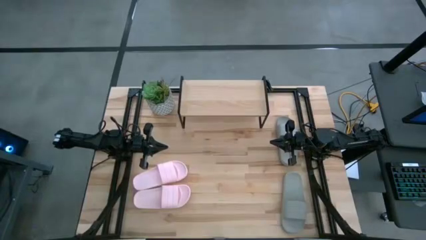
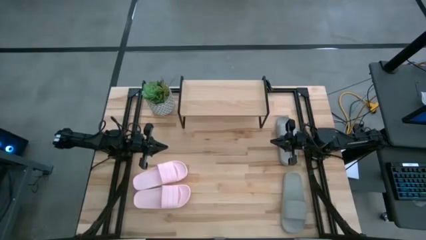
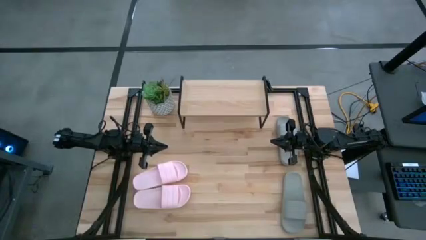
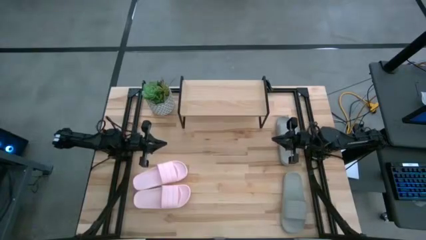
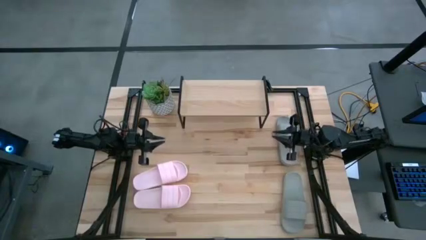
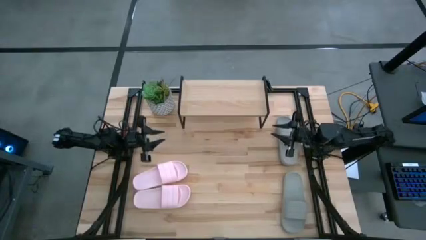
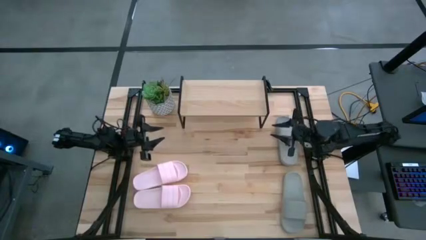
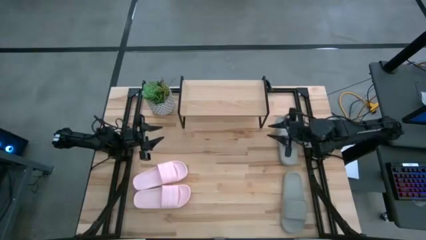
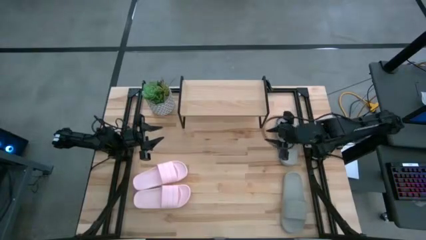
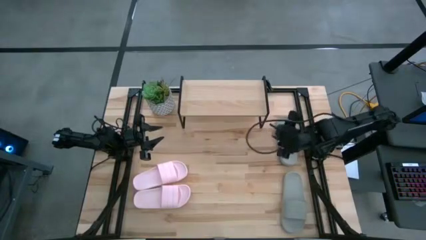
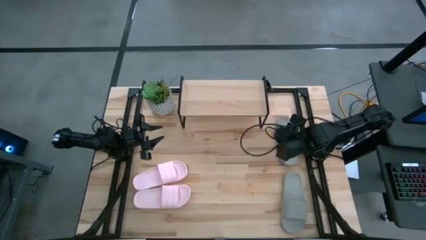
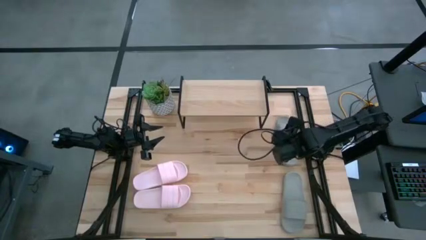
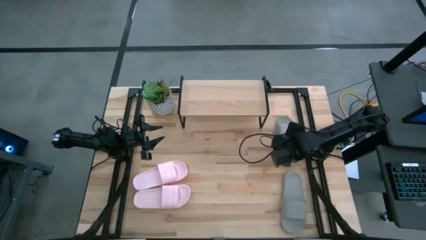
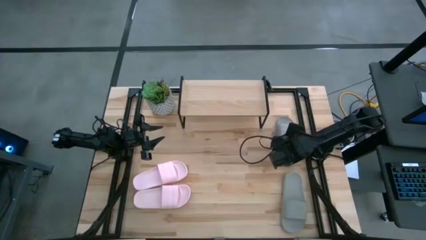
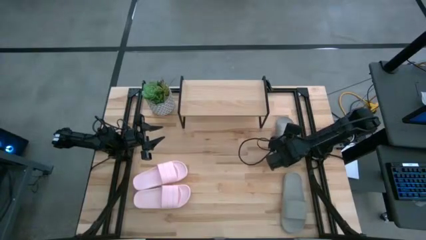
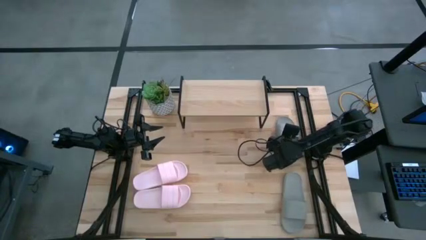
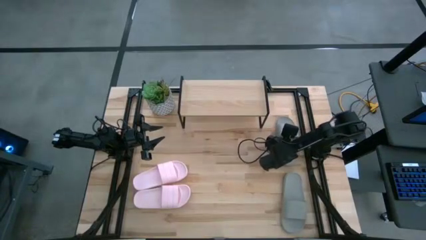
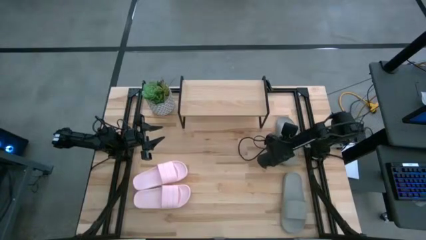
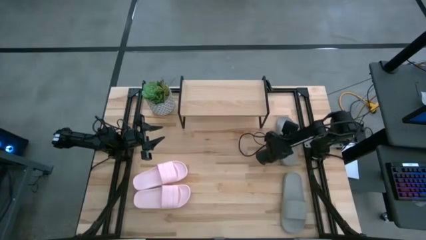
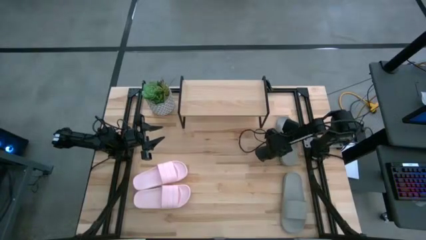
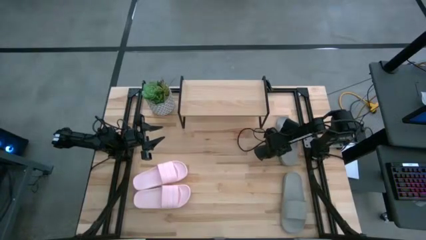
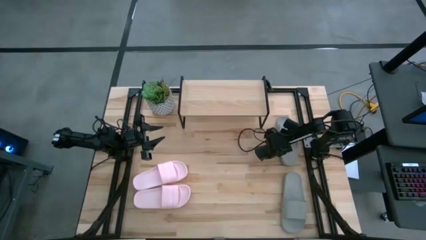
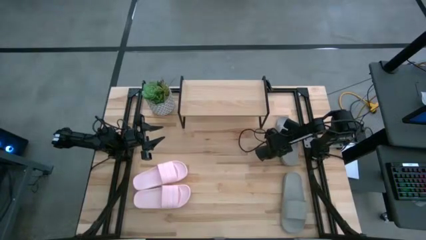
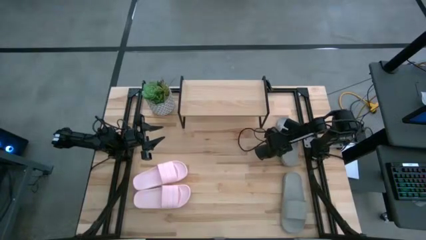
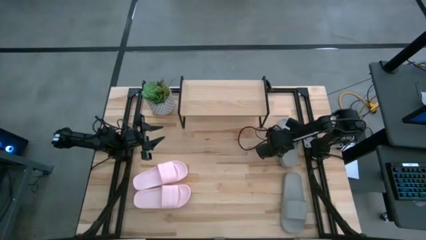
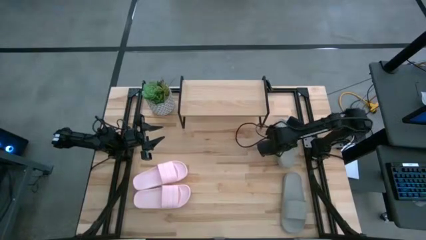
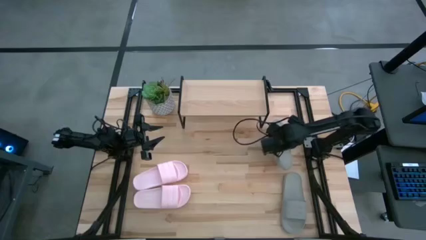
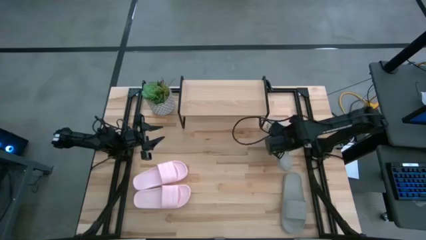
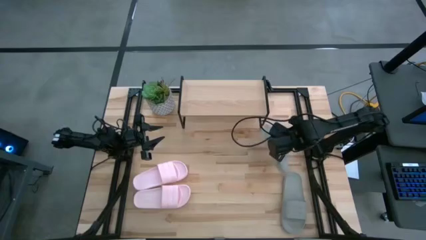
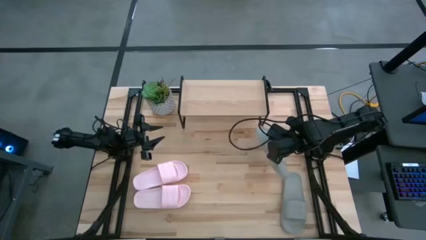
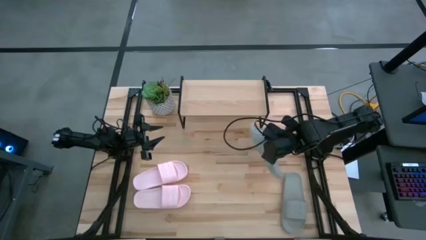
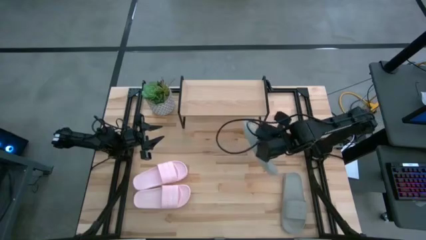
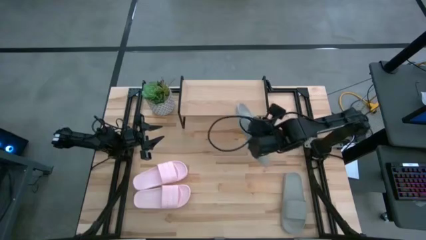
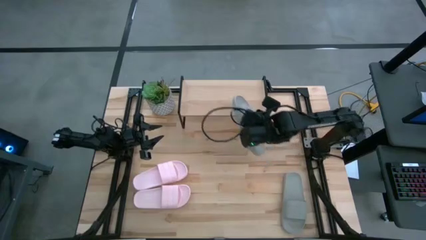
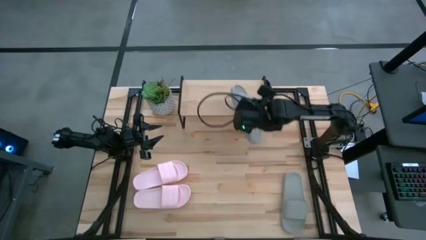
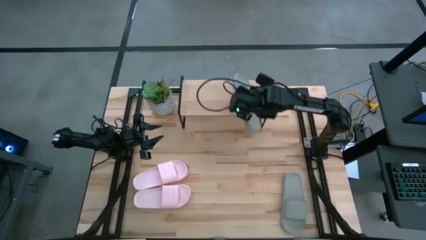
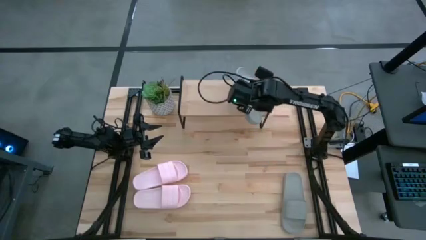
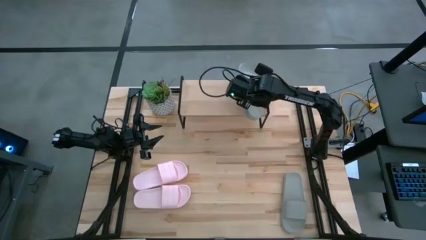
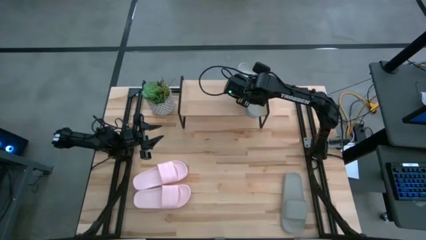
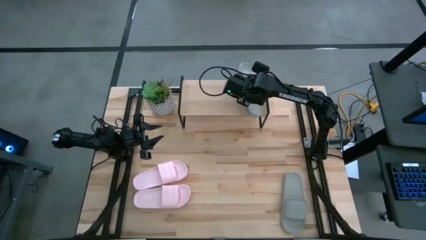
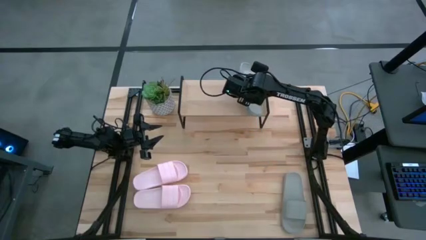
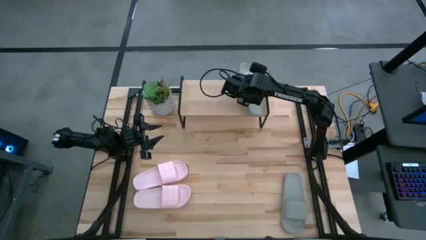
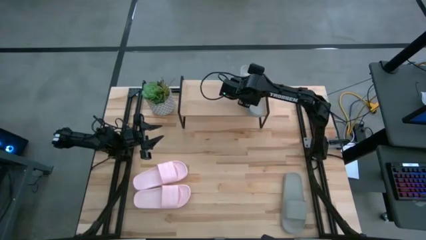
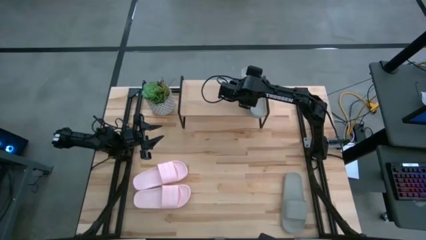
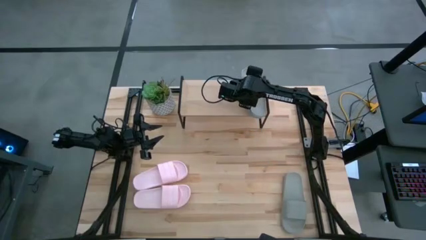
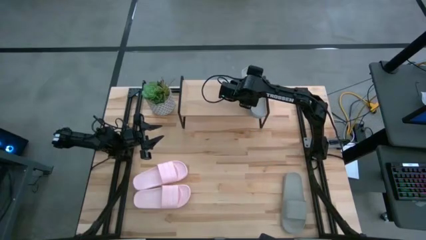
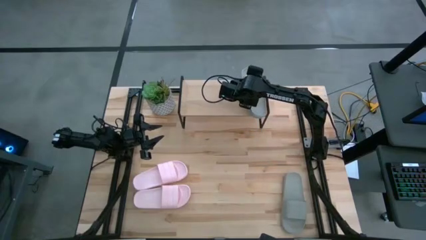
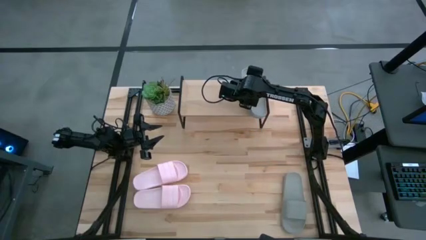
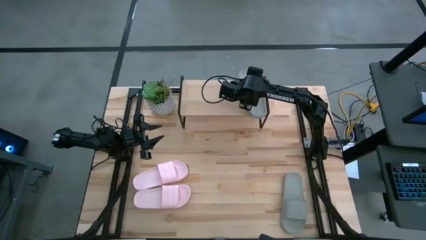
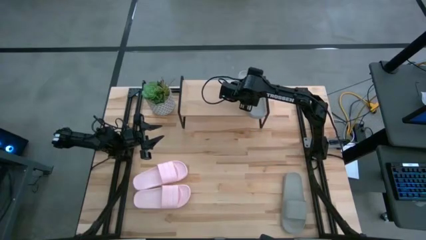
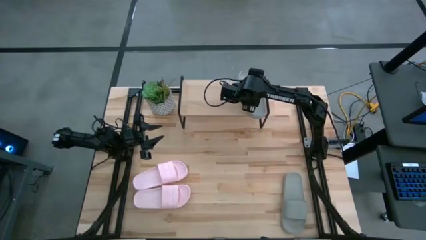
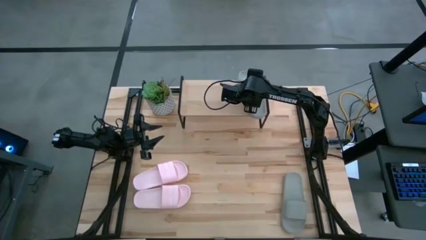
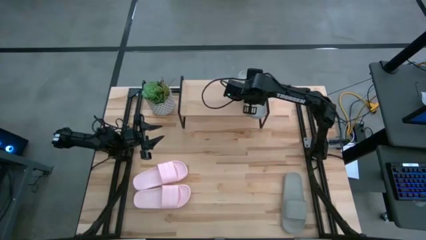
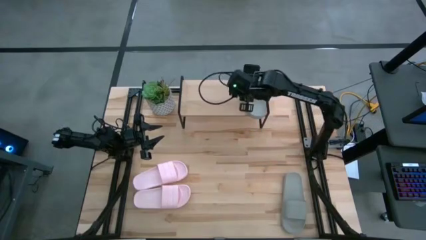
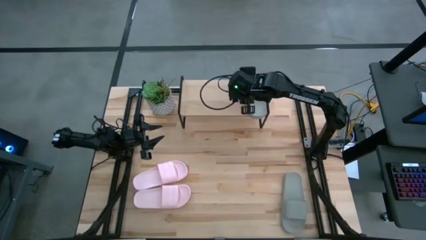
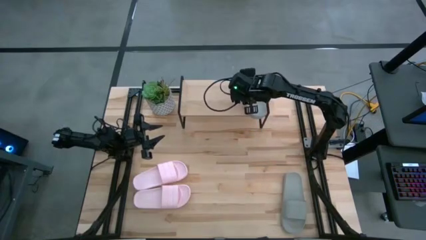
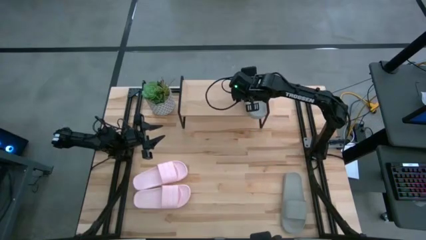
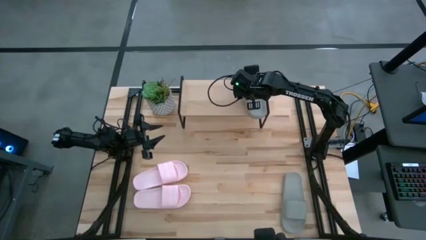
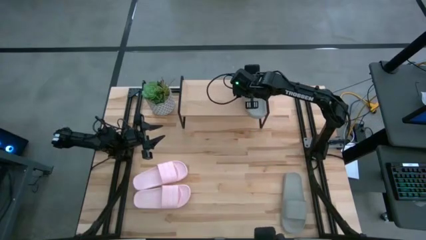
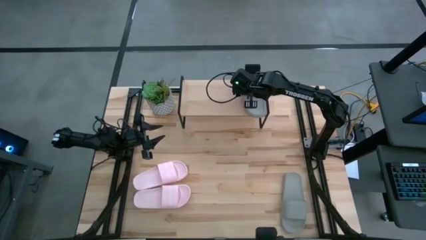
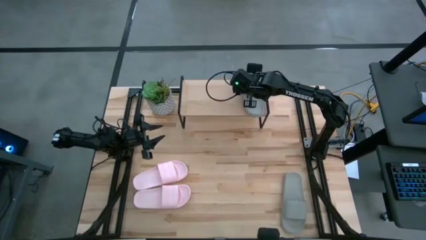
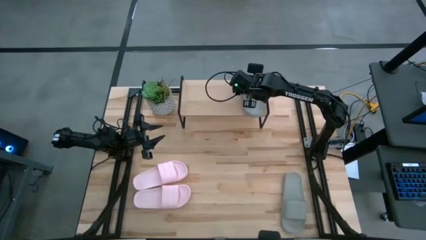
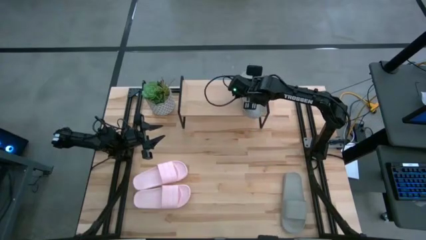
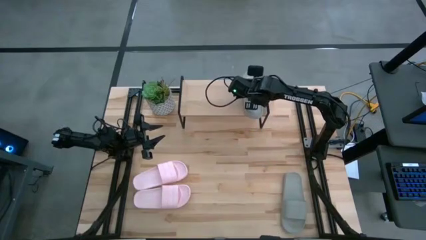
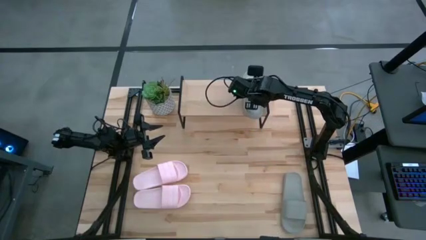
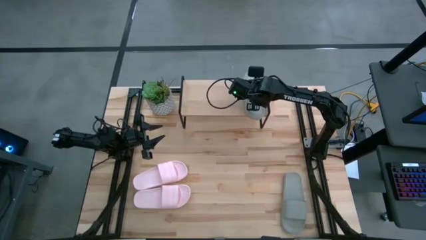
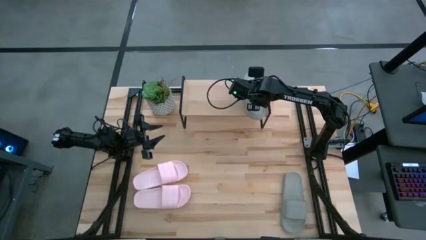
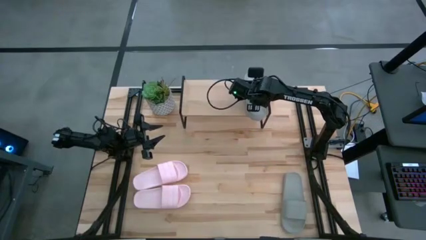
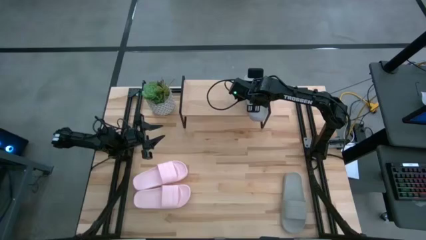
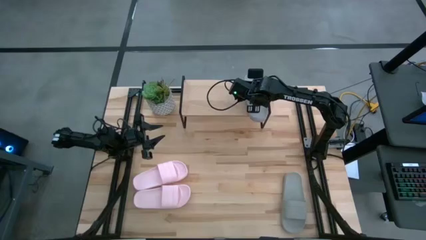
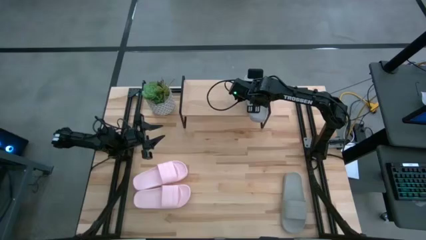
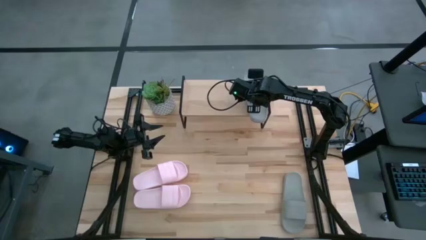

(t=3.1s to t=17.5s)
Task: Pick and place slides into the shelf
Put the top gray slides on the shelf
